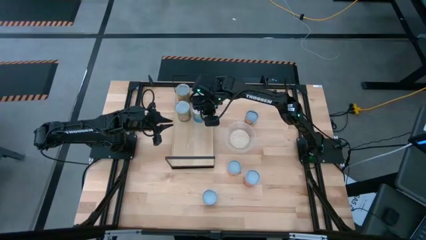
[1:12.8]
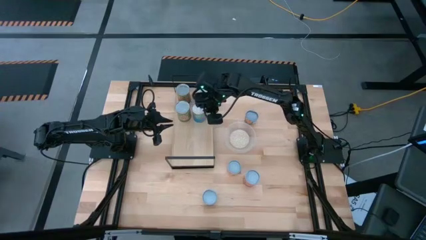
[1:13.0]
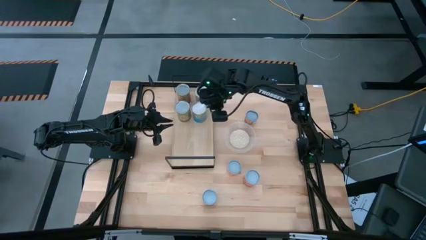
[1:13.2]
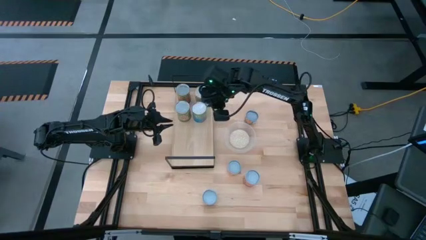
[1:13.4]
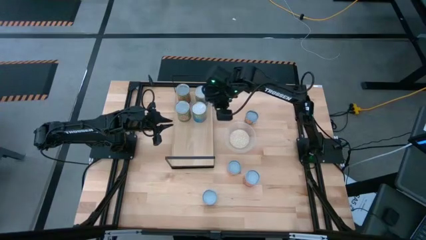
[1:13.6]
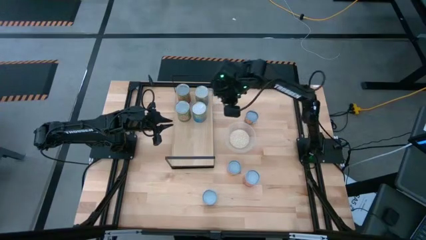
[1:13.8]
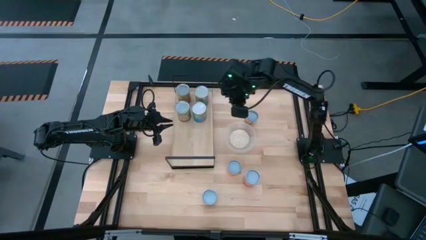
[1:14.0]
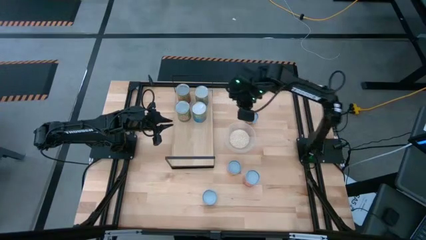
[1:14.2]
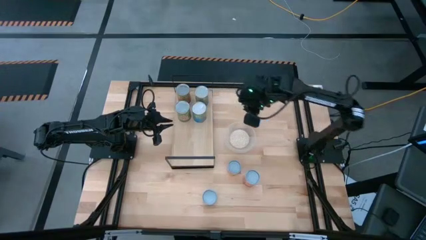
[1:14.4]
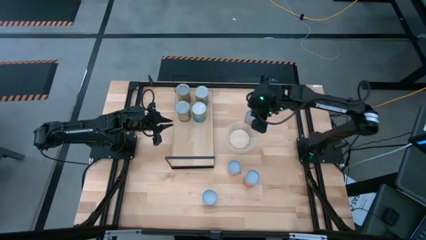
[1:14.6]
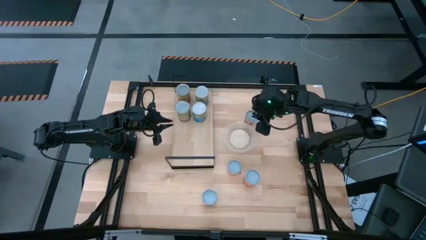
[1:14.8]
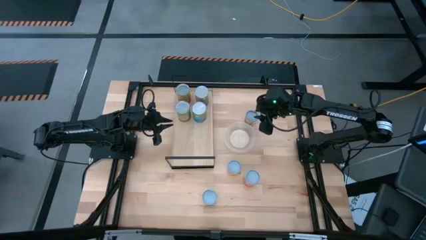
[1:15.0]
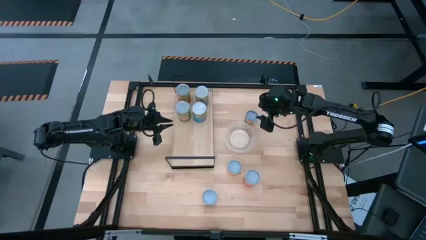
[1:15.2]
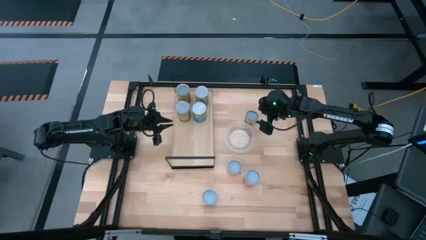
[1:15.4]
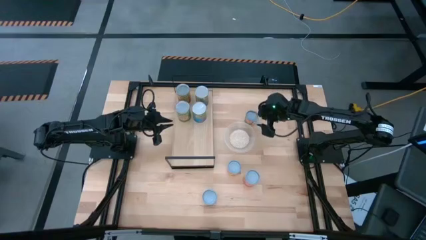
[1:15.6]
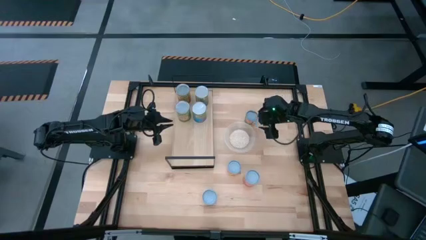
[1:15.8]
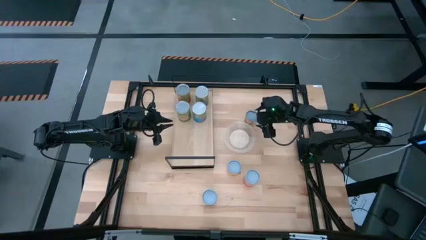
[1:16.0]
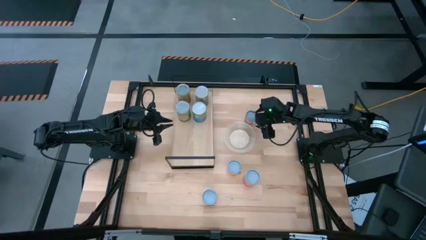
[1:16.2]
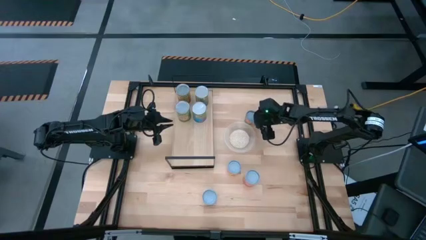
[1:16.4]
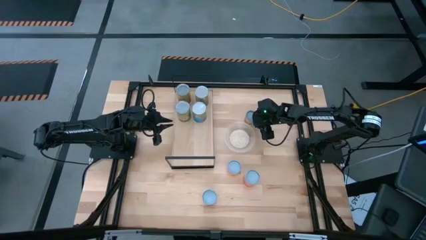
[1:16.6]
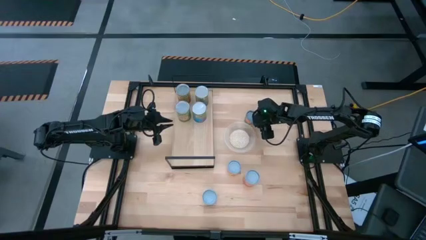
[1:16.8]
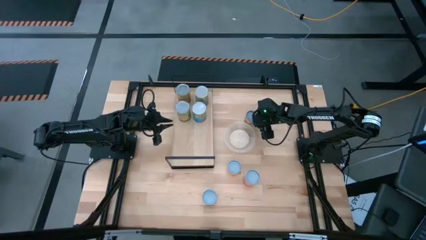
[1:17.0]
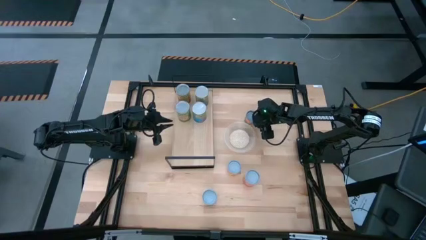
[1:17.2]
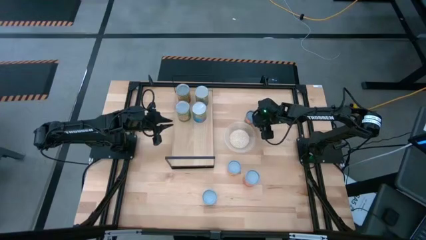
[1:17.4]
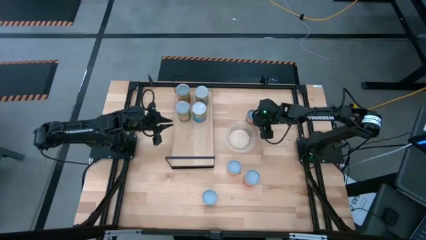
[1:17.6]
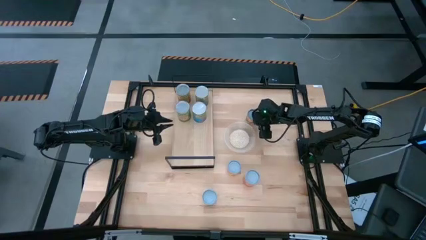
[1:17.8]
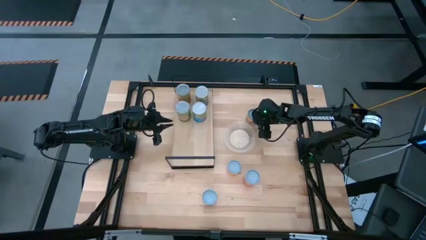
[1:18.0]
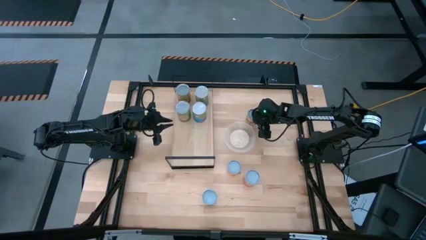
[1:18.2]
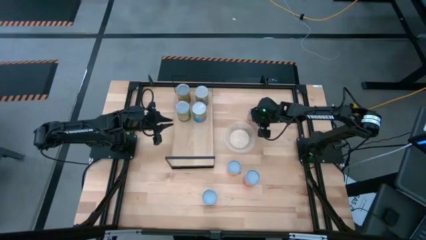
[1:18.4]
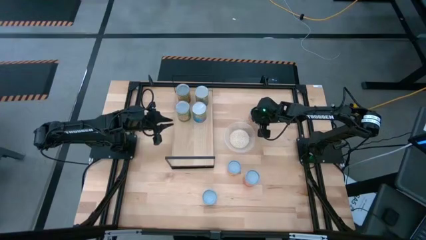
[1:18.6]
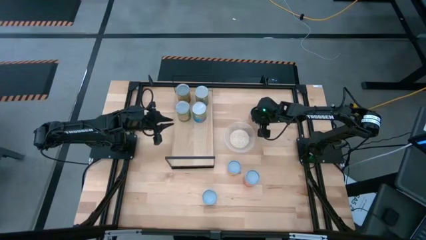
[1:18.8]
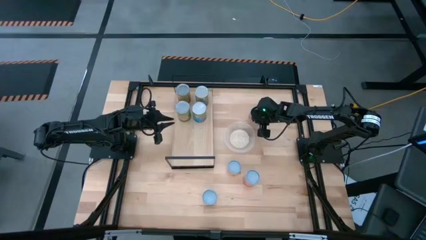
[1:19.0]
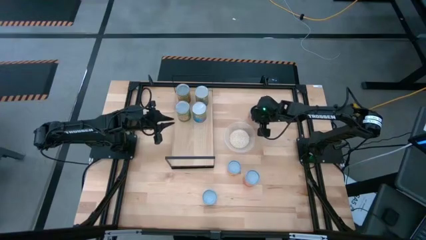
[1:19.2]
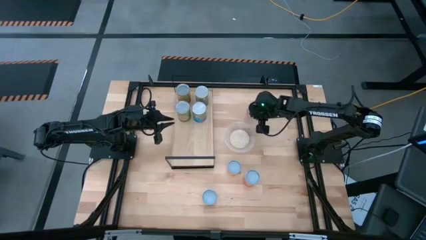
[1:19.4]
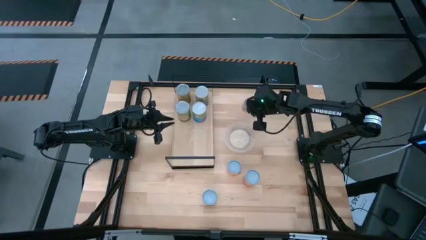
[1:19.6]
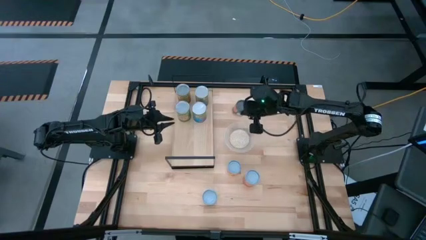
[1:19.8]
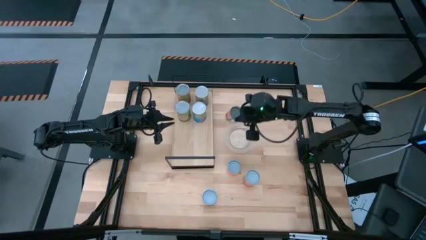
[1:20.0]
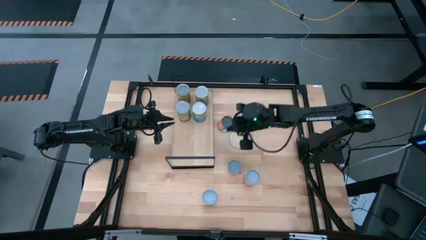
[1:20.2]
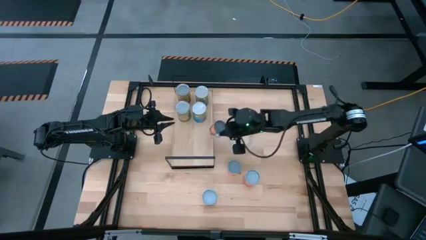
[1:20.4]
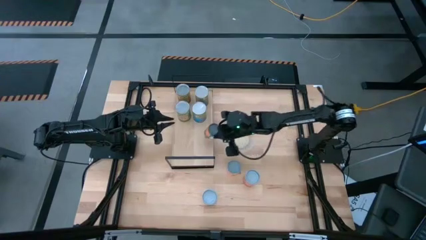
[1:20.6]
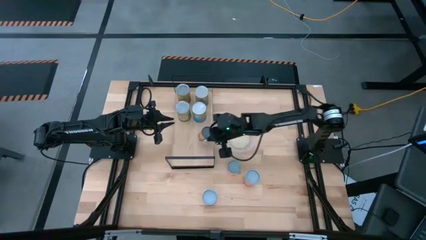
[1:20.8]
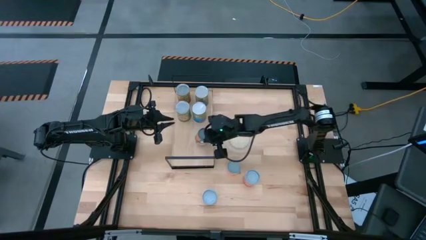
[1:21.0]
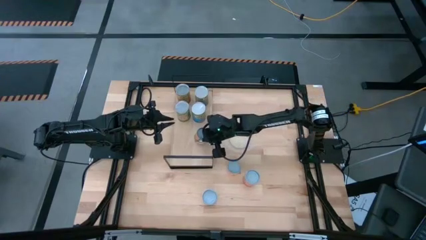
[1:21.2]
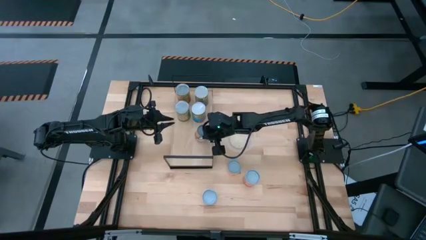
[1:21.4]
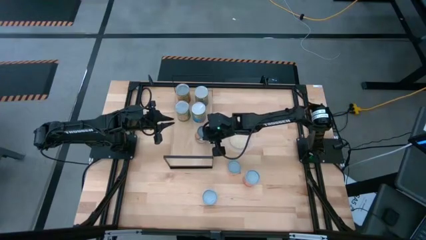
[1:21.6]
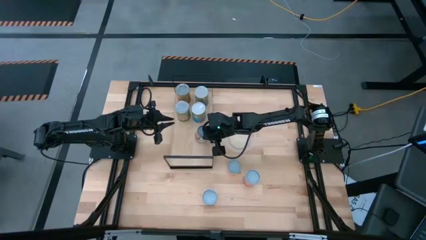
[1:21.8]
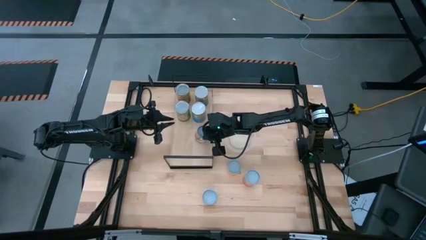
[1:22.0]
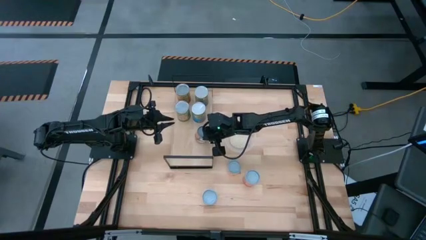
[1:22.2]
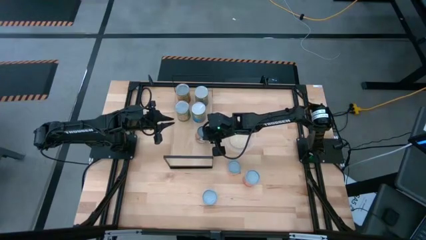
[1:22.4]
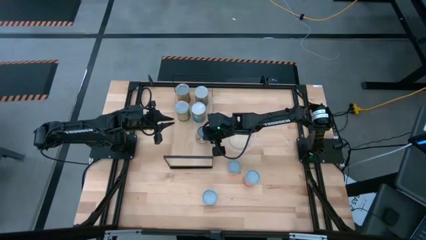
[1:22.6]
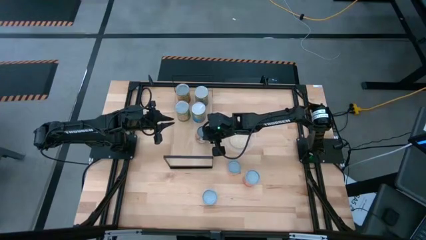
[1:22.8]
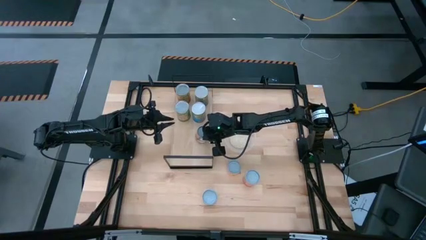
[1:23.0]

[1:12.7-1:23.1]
Task: Pick and place cans onto a shelf
Put the small canned oranges on the shelf
